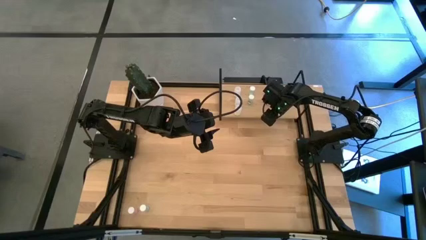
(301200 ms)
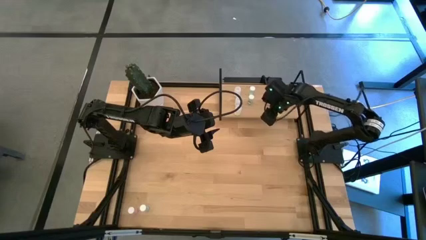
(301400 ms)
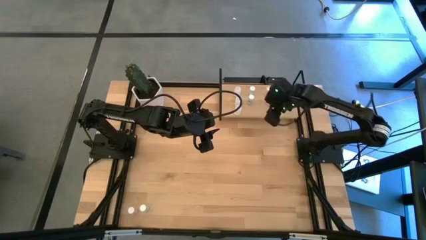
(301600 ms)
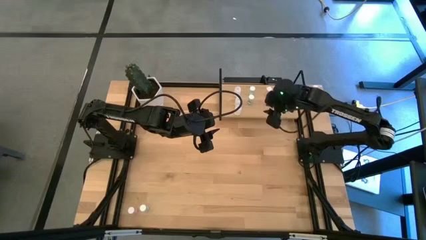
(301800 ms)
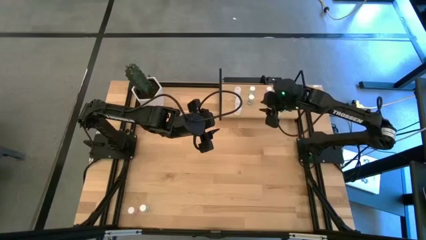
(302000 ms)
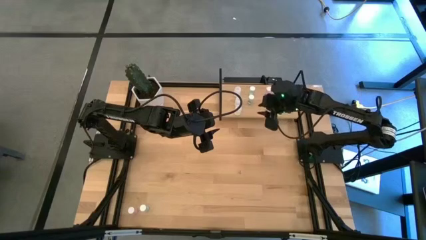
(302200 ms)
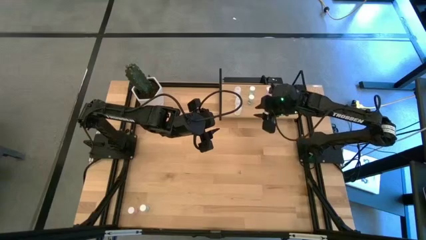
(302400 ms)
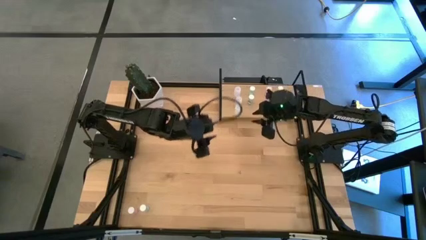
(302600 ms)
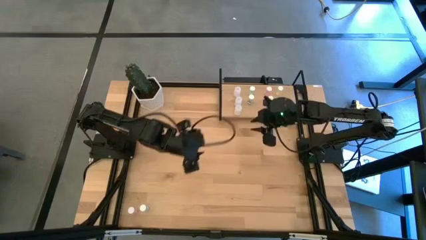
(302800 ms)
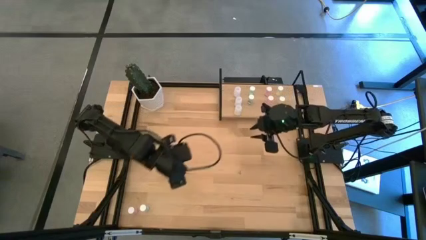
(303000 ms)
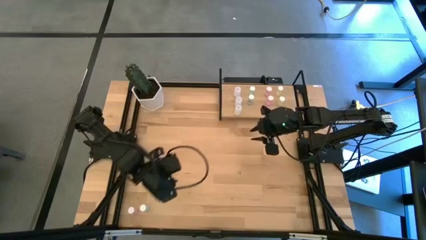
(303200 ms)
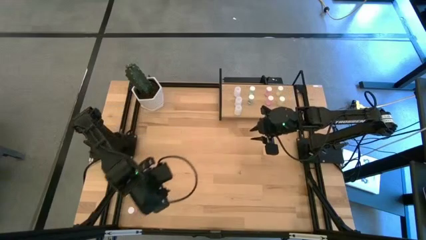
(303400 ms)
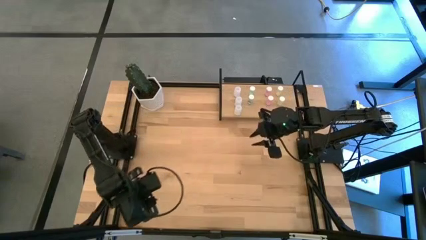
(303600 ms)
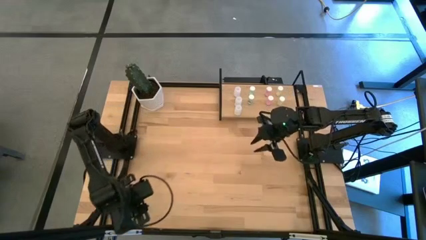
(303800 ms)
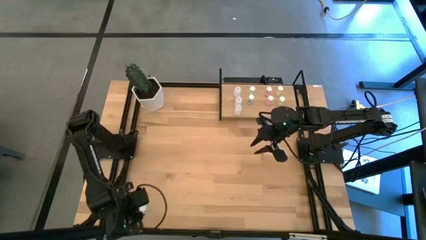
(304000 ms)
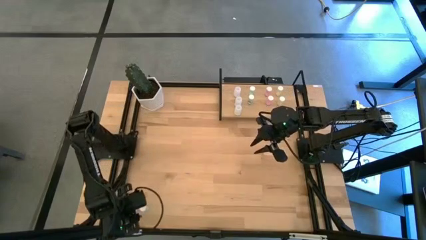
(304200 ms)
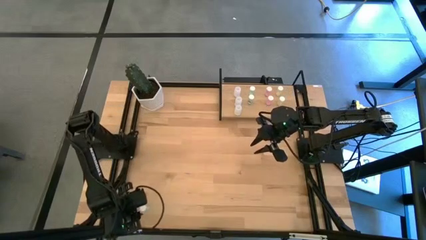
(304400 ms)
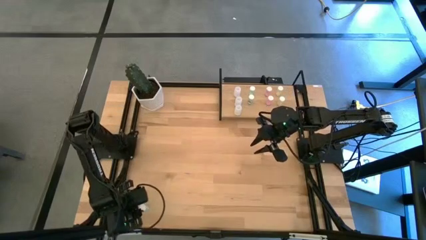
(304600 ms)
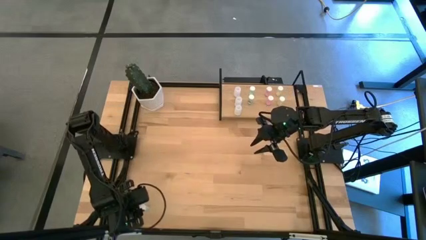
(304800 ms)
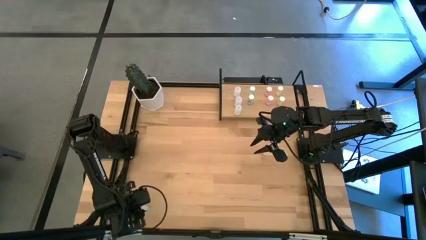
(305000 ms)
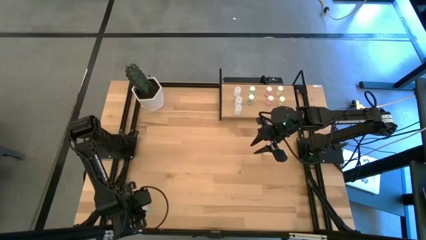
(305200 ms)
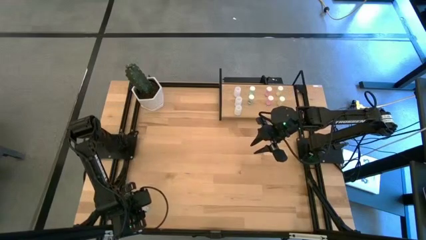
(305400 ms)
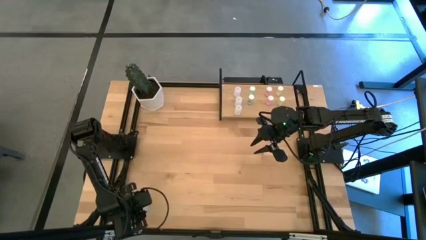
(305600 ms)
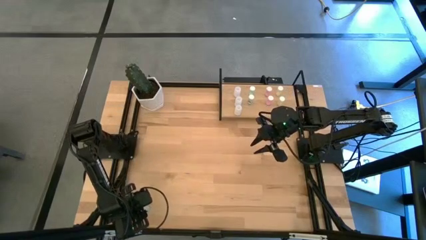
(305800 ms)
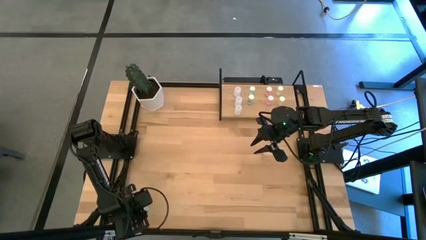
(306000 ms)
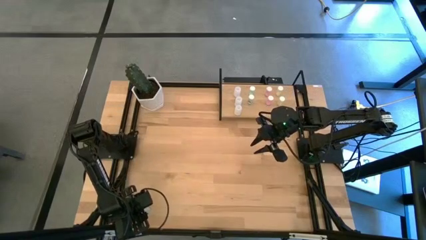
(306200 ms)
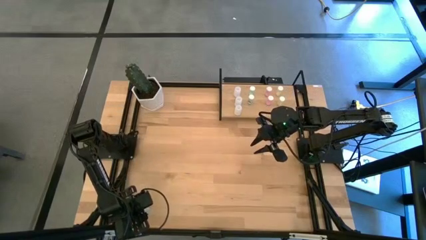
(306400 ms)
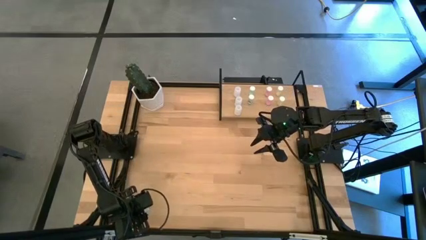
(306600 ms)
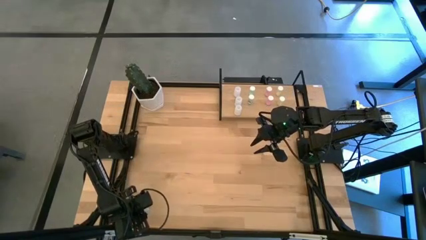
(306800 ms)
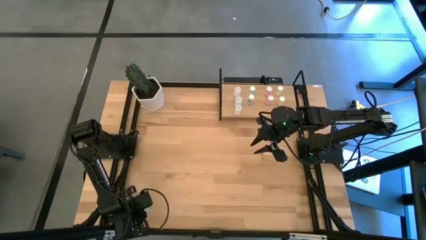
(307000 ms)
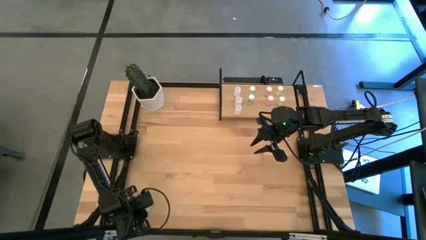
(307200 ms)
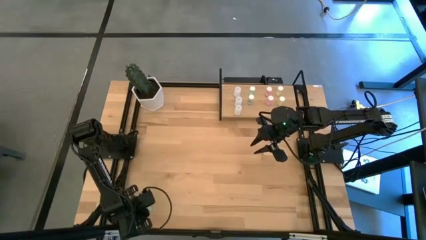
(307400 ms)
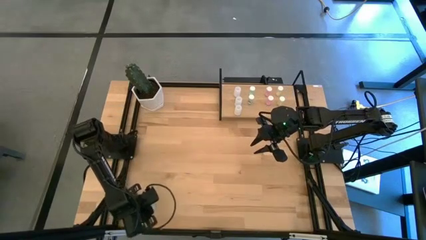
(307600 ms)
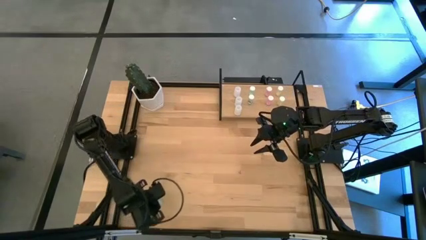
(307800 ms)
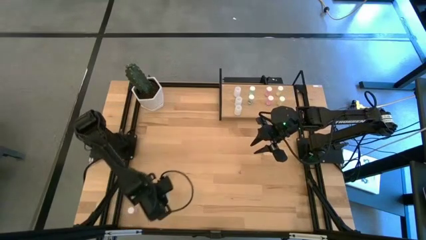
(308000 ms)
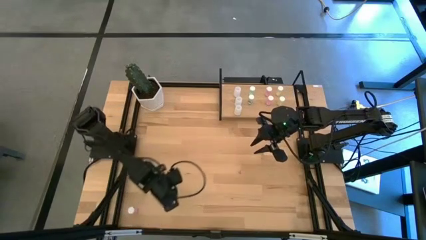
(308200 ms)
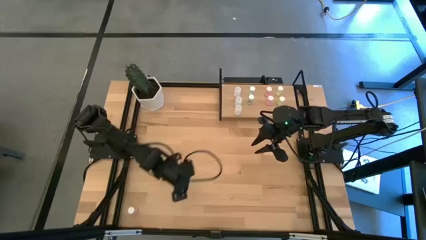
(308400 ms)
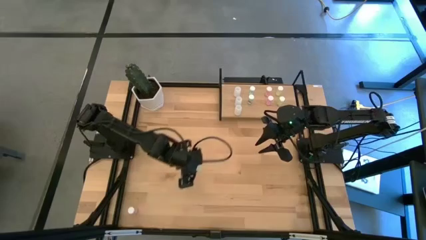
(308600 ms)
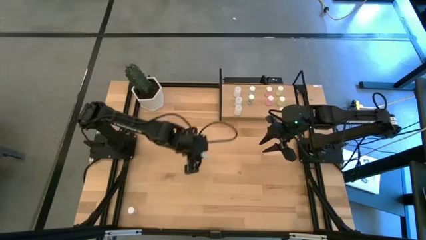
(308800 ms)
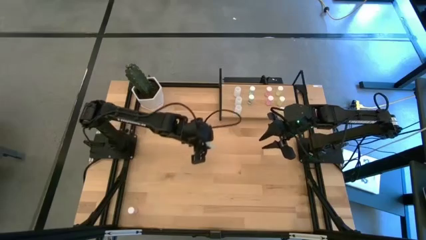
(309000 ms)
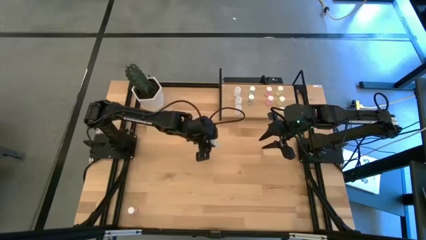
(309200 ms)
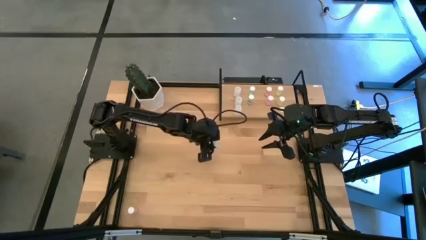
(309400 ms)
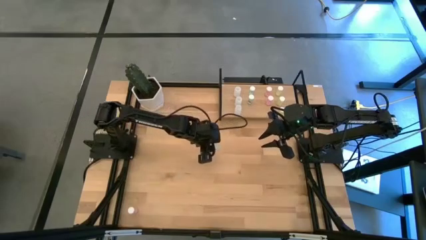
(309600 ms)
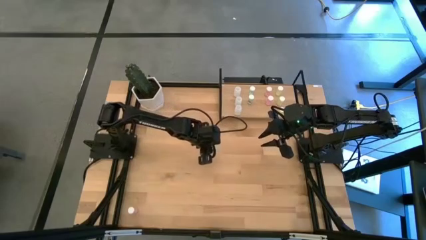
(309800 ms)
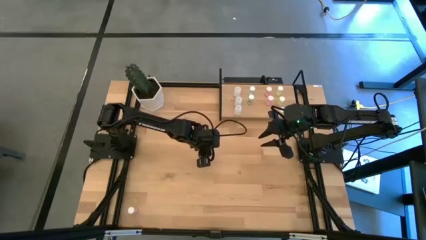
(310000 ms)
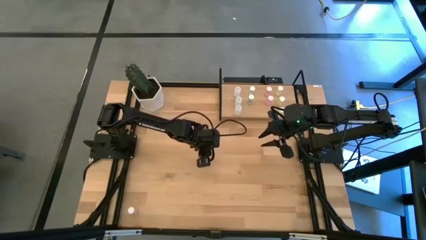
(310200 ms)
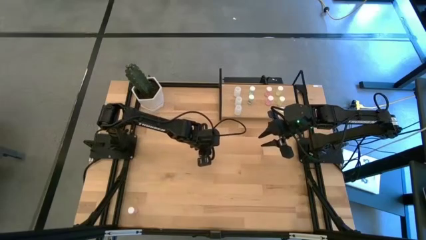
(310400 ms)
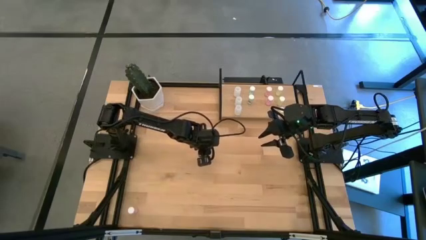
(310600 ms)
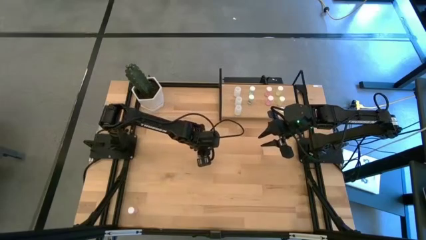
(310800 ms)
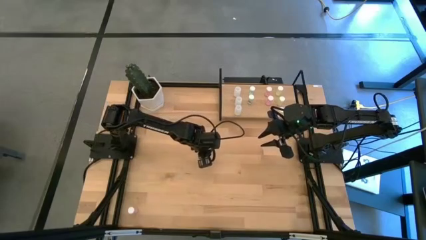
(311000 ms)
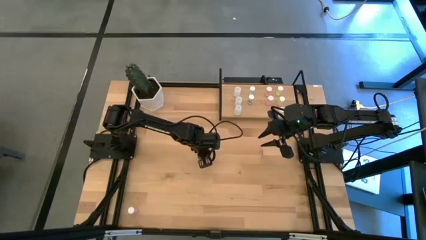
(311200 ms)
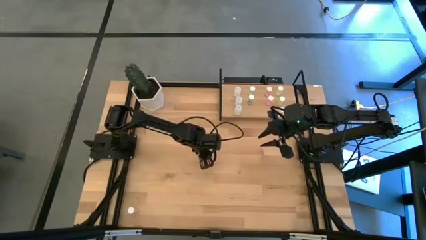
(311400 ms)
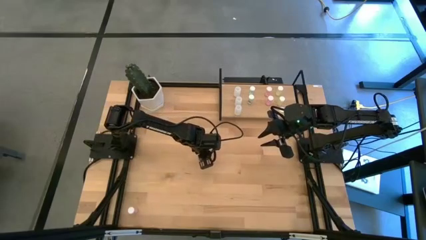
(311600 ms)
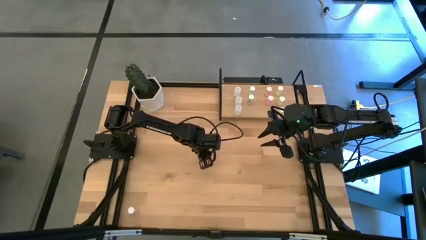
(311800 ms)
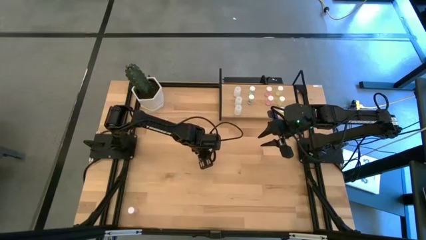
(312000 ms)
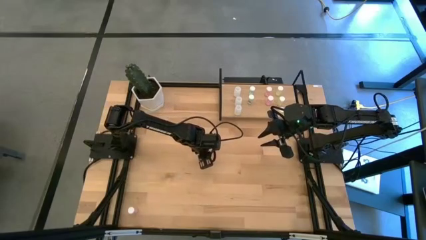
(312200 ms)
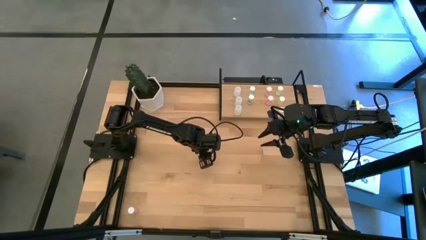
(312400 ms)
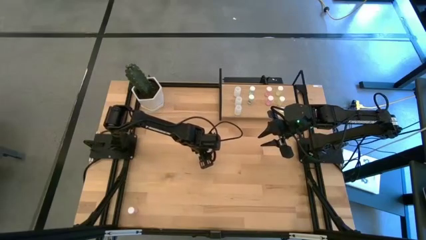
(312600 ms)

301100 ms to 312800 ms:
Task: Pick and place medicine bottles onto shelf by color
Put the green pill bottle on the shelf aligned with the other green pill bottles

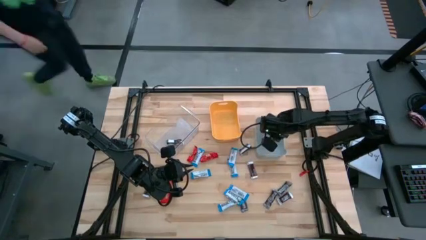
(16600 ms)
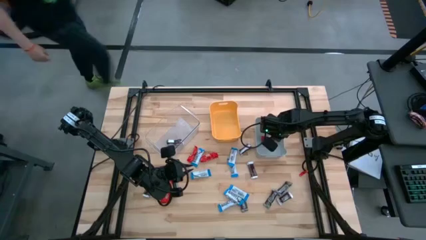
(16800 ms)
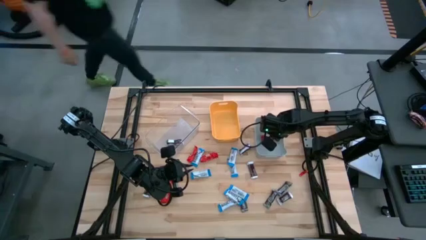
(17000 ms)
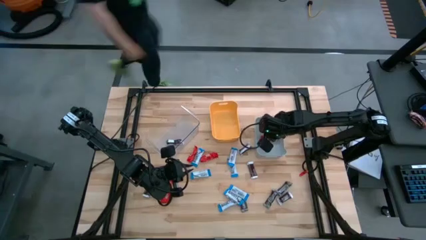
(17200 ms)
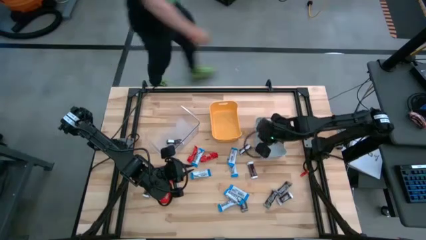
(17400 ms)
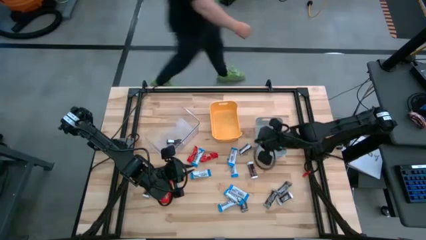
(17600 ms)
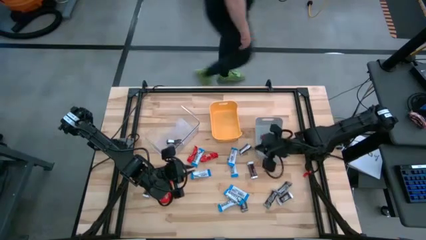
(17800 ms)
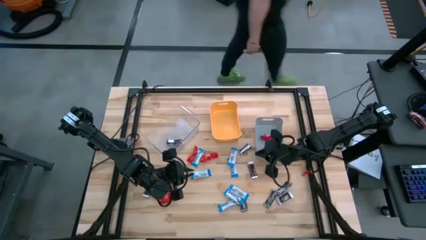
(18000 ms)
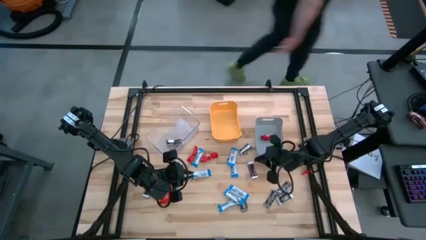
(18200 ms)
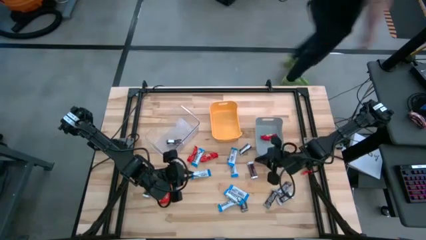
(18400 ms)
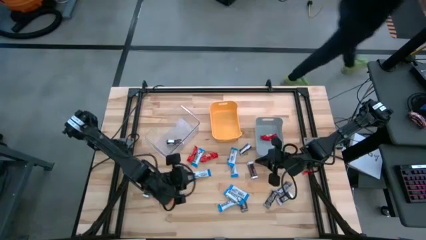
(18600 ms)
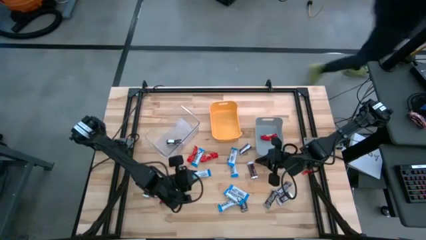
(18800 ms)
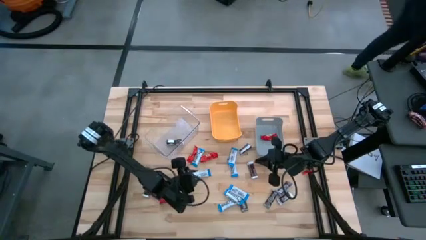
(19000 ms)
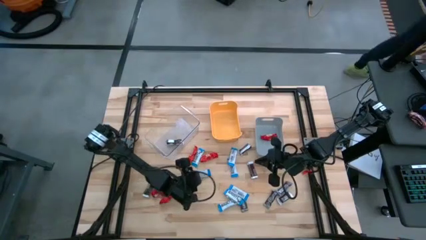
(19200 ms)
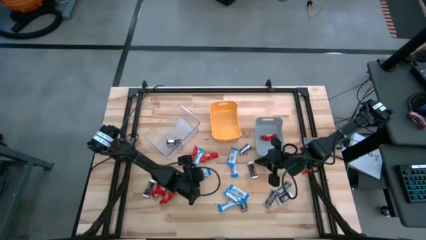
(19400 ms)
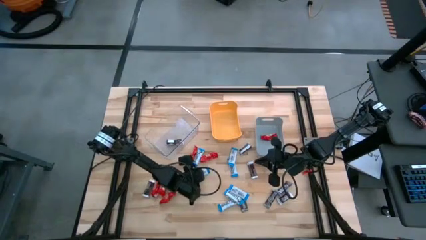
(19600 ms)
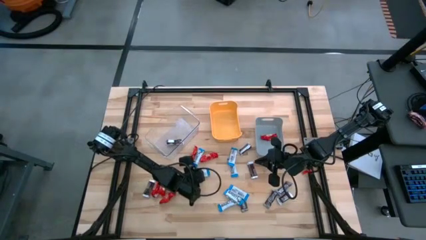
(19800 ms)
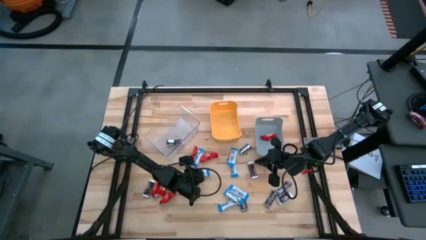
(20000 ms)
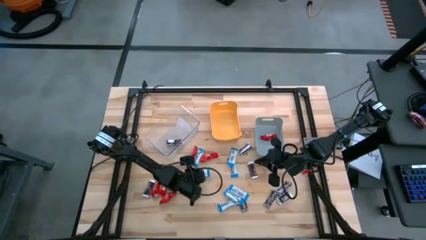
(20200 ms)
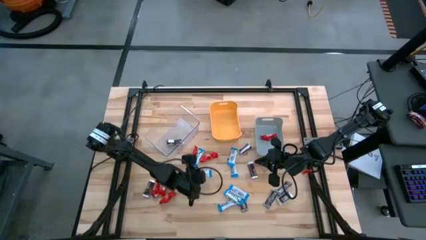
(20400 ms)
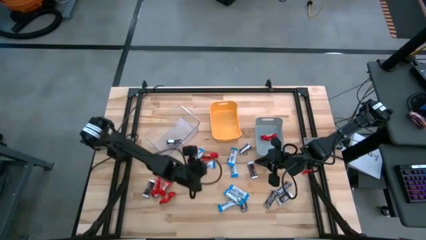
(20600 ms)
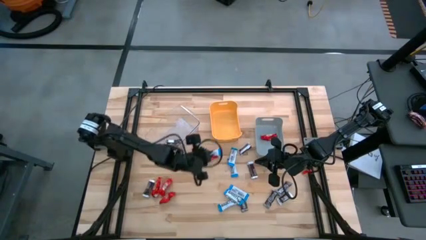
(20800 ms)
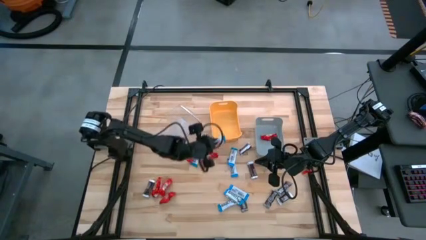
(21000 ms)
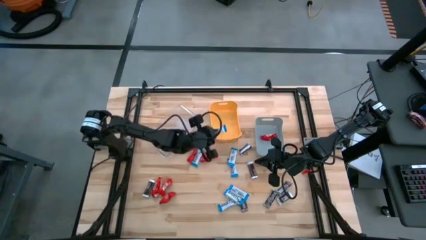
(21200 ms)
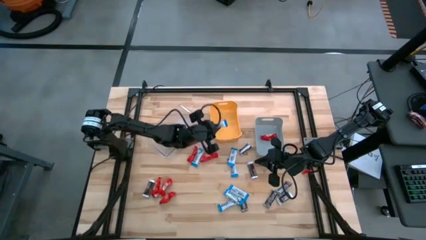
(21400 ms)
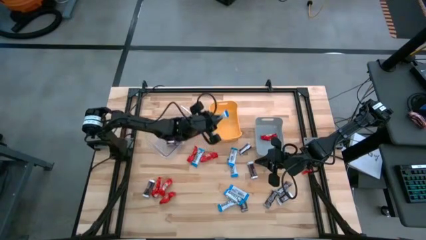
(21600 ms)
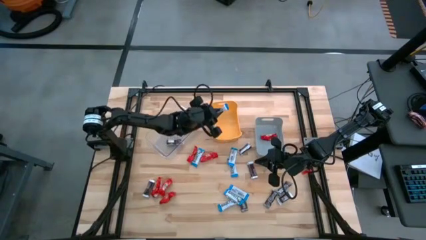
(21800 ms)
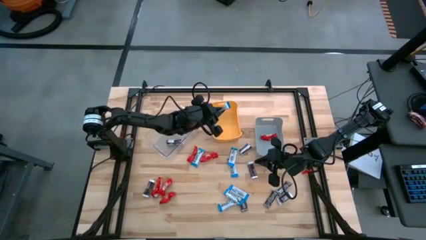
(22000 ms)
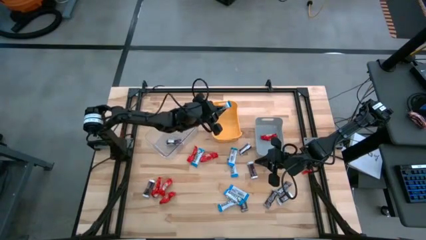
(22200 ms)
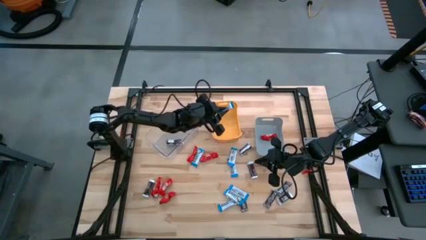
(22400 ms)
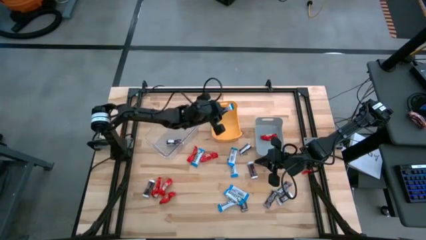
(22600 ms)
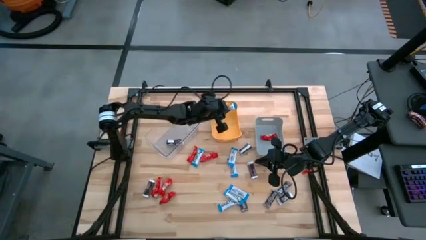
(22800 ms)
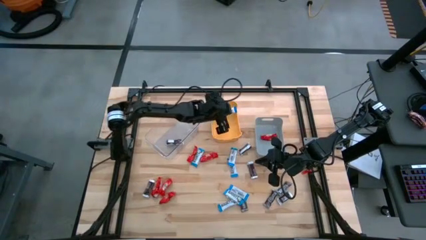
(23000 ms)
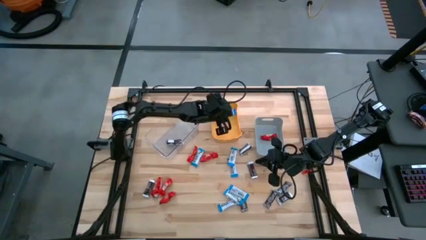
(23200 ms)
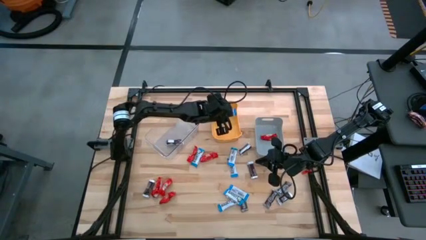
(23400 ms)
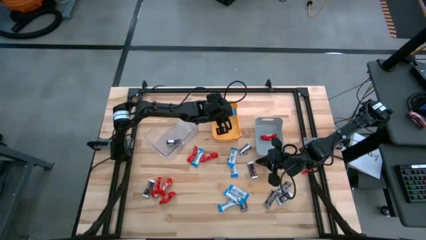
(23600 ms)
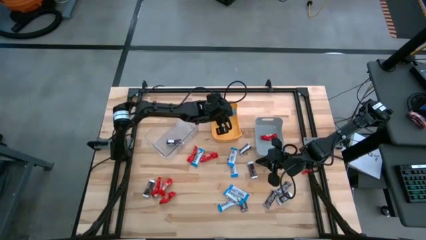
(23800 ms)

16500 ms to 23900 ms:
Task: Organize candy in baskets
Put the white chocolate into the yellow bin
